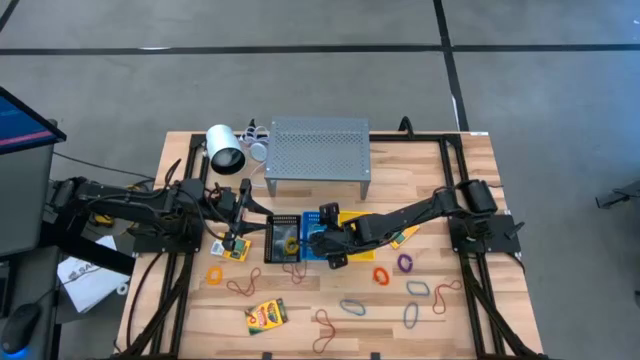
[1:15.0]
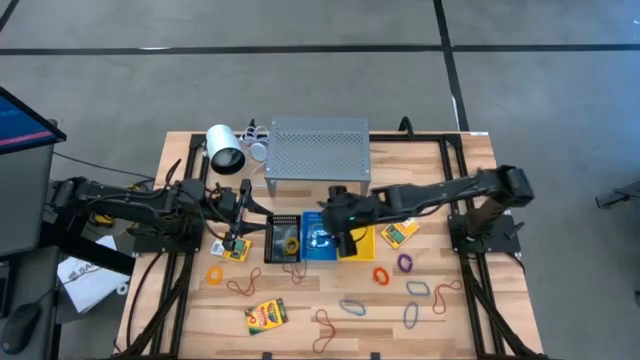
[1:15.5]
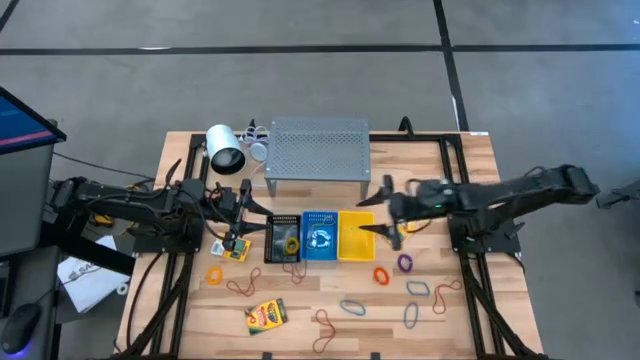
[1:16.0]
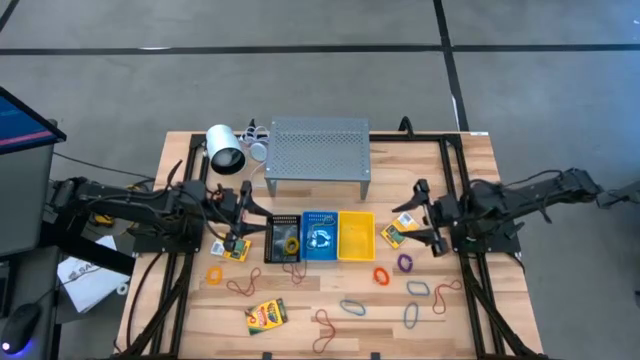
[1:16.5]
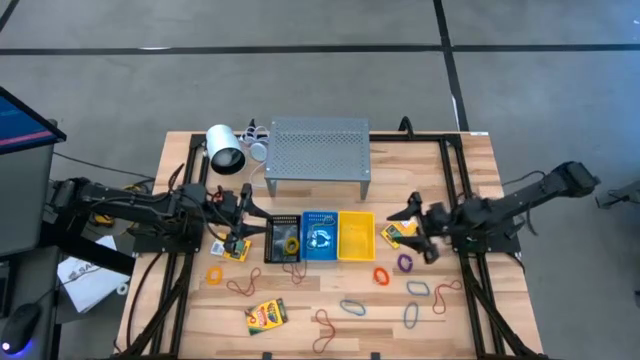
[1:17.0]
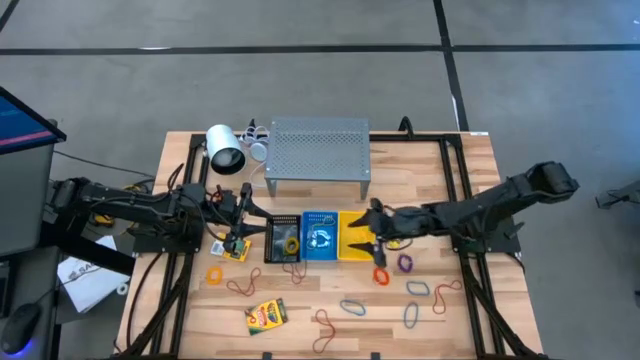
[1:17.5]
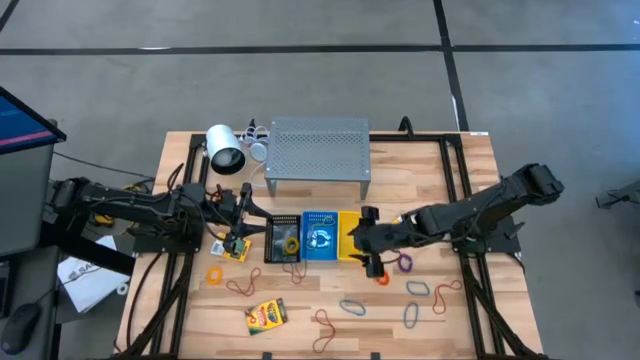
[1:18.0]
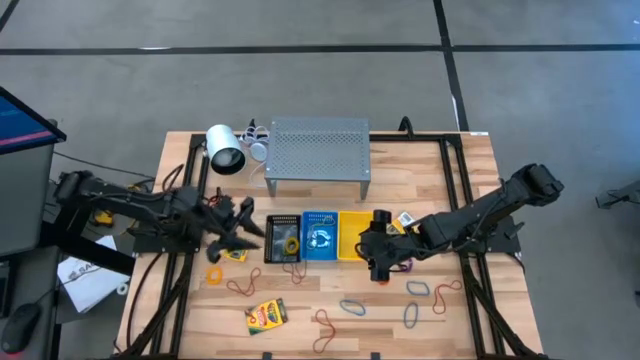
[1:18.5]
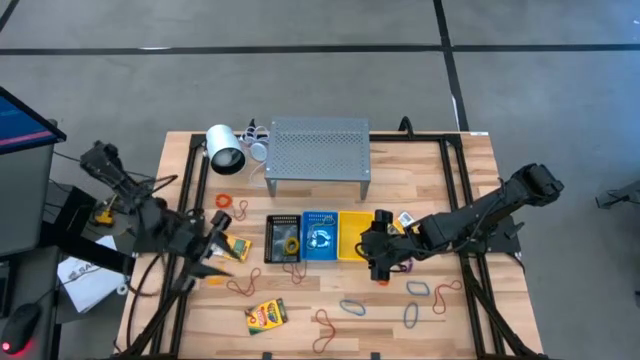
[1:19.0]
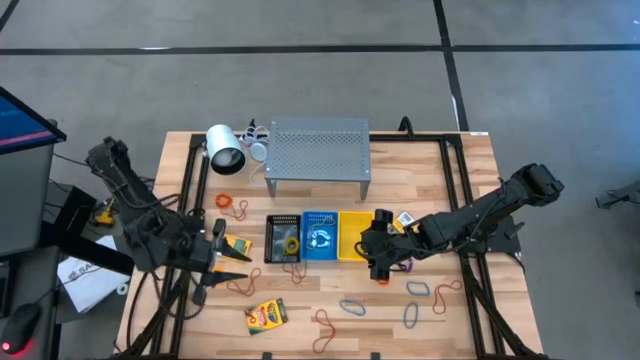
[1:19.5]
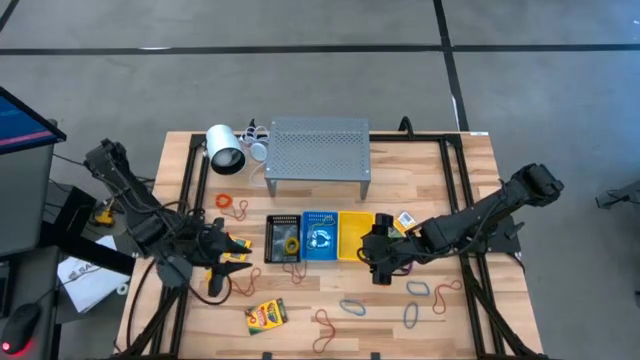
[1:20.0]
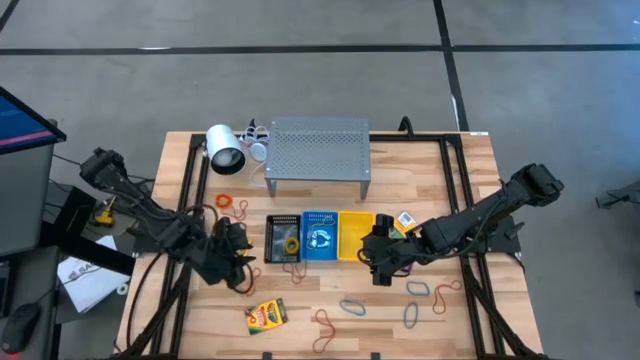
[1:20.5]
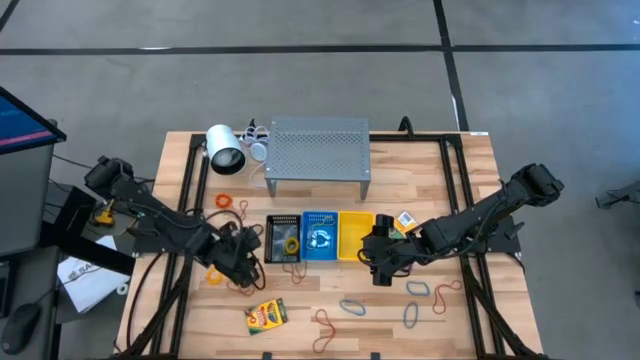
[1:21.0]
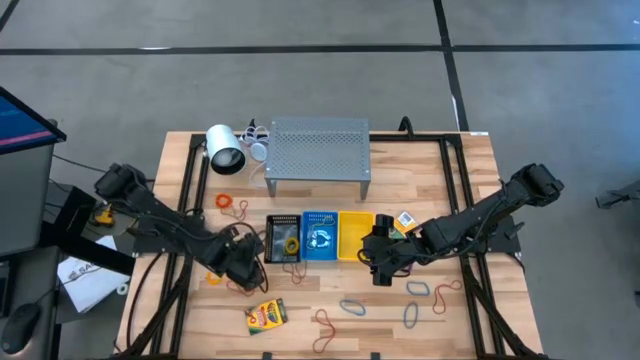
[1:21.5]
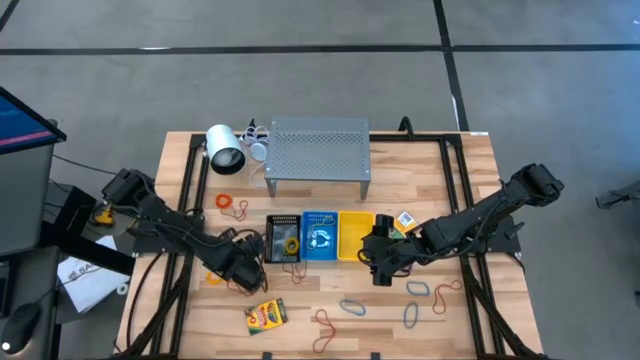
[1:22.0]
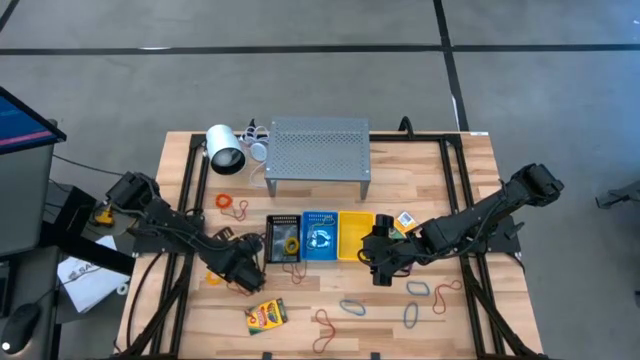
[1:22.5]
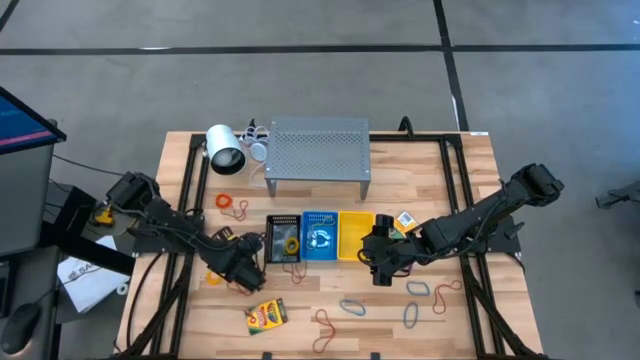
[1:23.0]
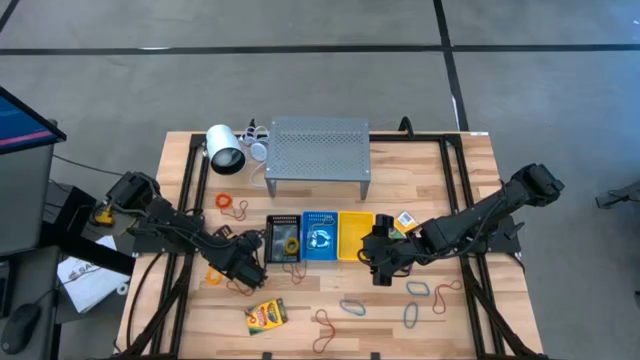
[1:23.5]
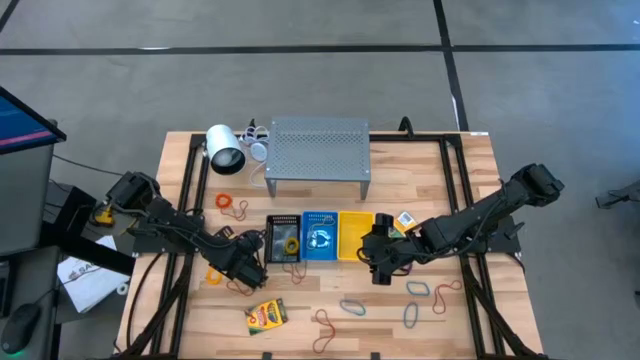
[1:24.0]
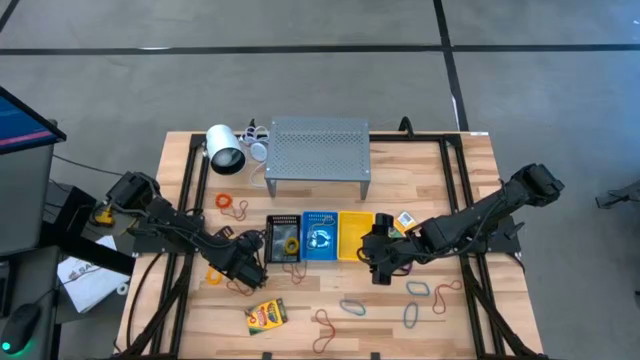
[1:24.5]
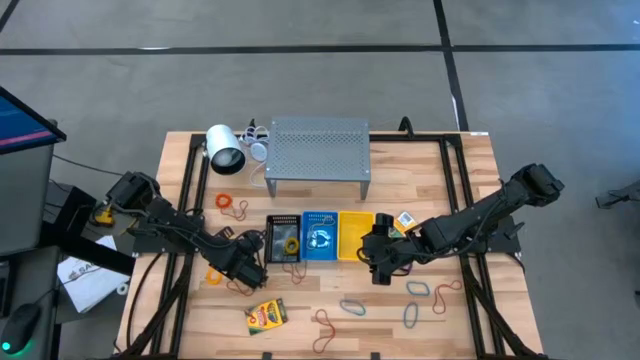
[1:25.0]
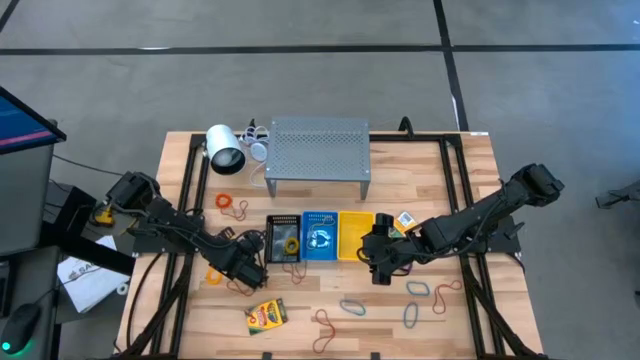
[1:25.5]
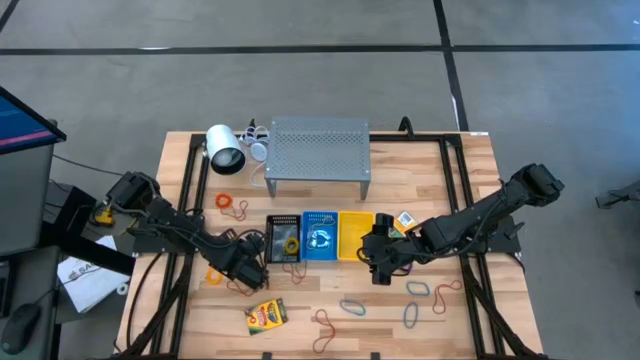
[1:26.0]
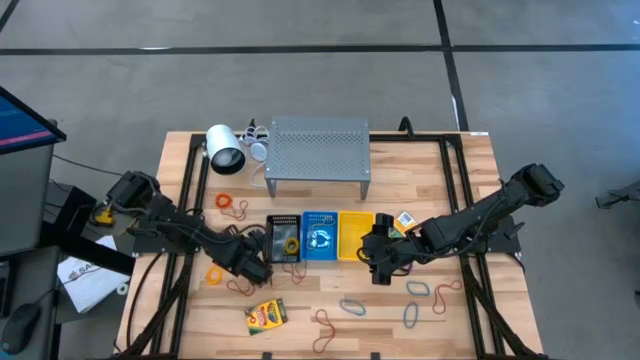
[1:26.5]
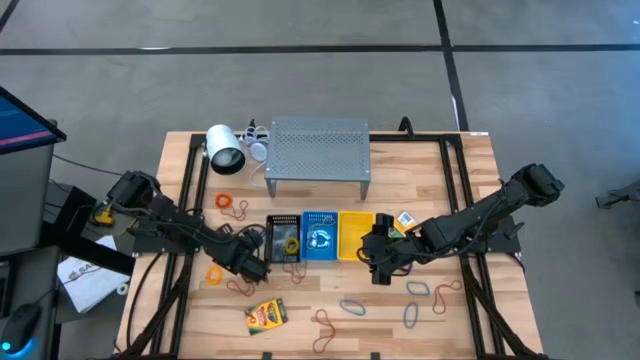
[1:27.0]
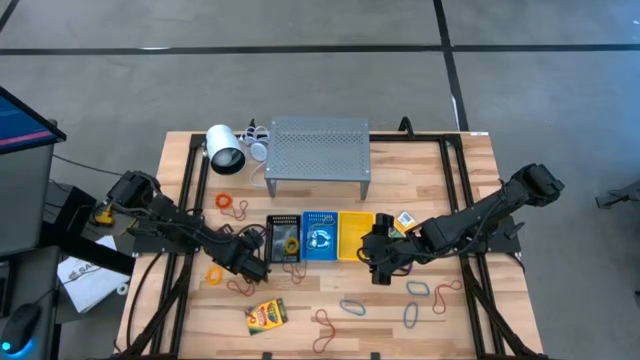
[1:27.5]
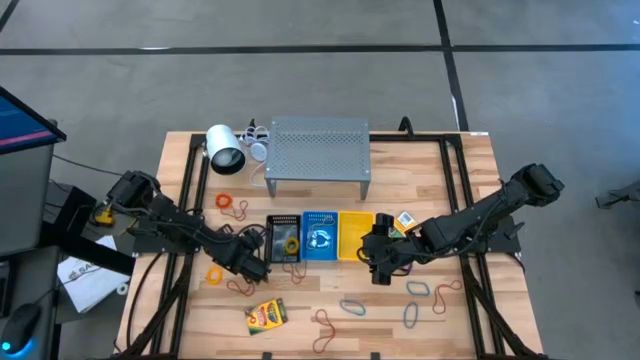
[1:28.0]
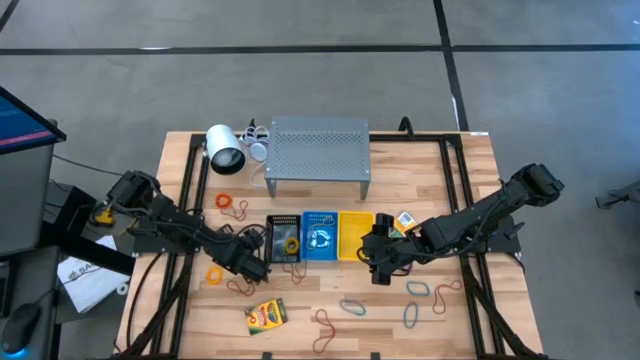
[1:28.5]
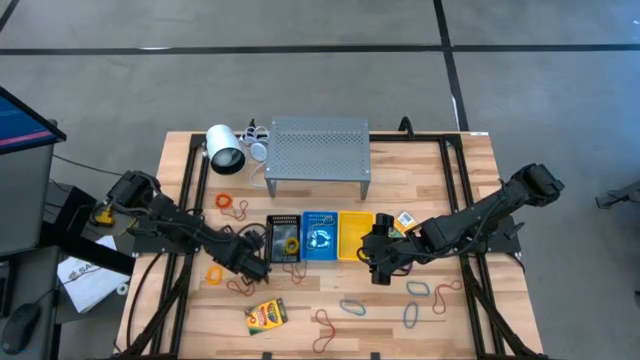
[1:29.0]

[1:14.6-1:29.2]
Task: Pick & Place Office Desk Supplies
Put the yellow crayon box into the yellow basket

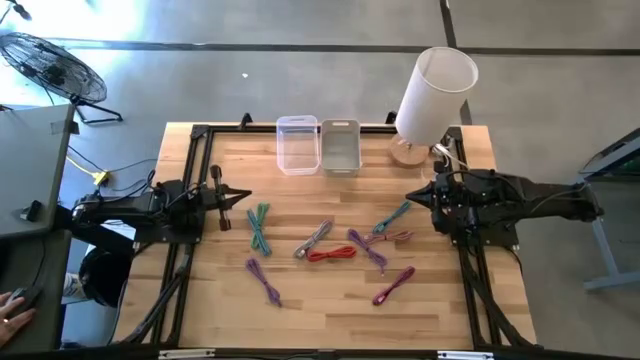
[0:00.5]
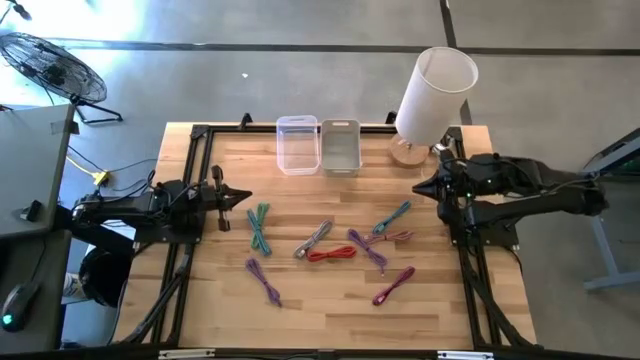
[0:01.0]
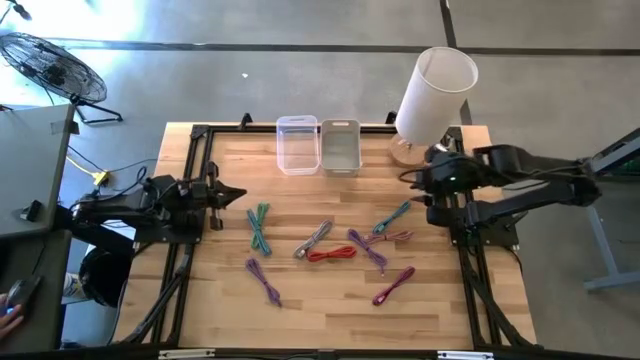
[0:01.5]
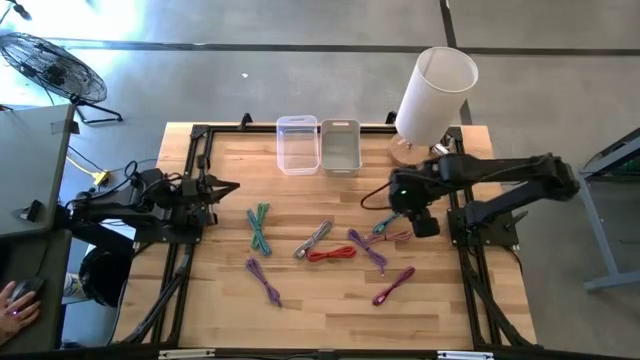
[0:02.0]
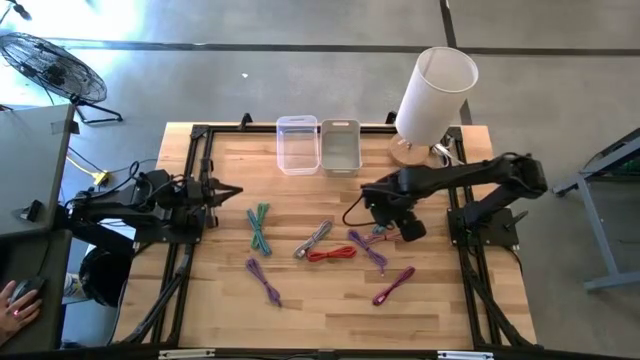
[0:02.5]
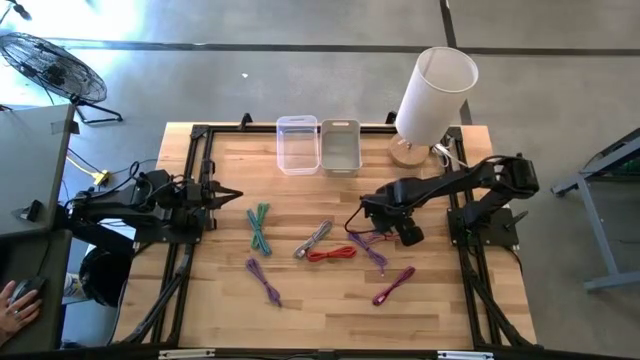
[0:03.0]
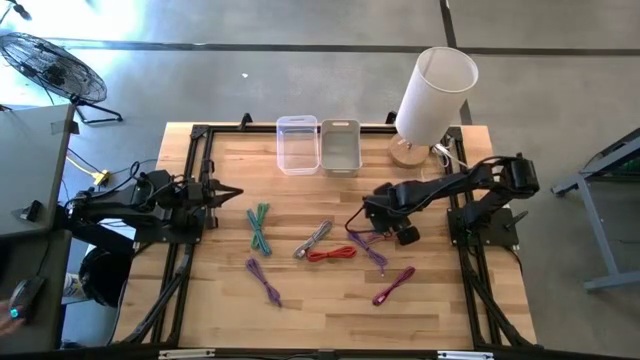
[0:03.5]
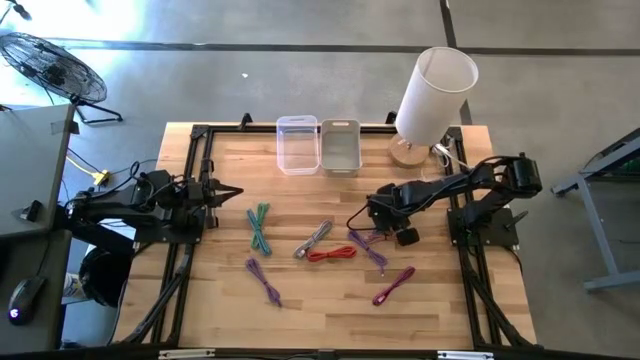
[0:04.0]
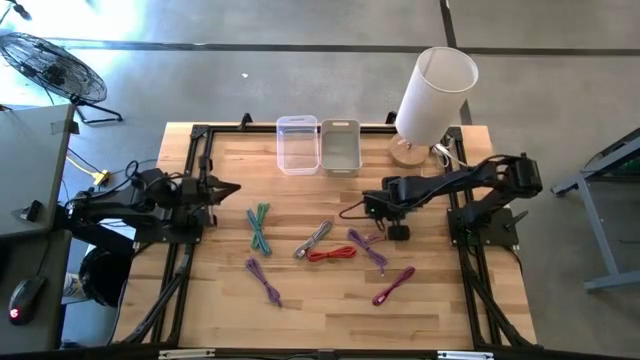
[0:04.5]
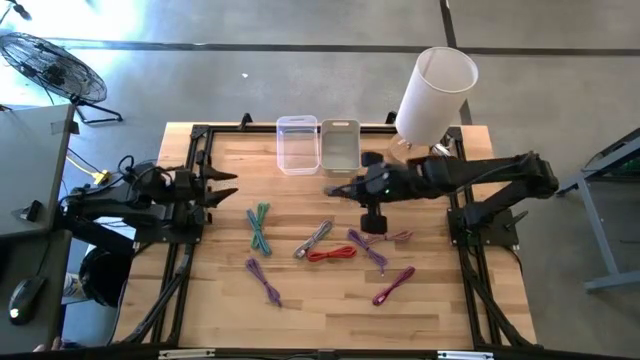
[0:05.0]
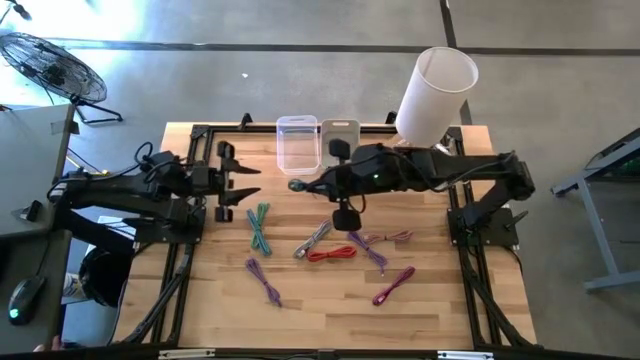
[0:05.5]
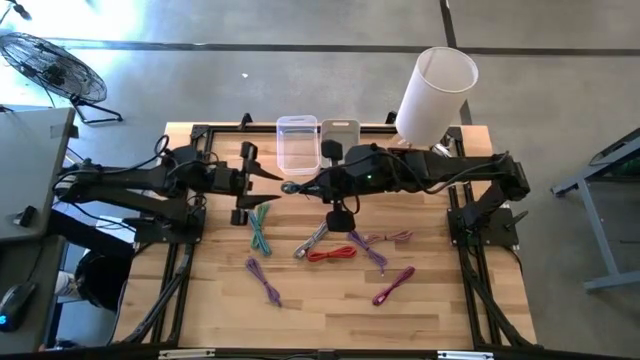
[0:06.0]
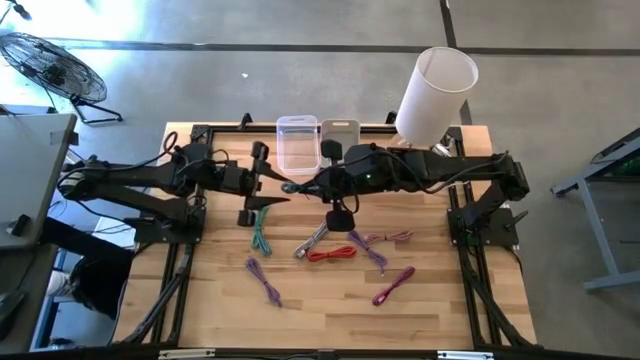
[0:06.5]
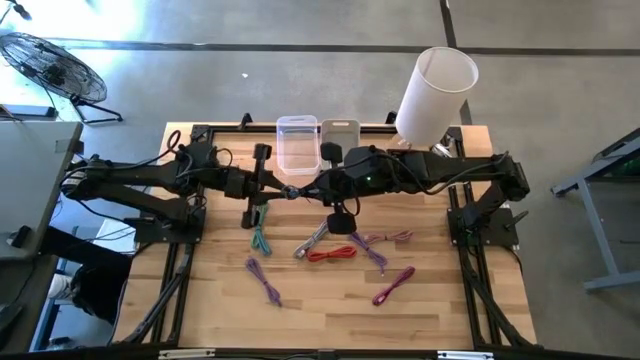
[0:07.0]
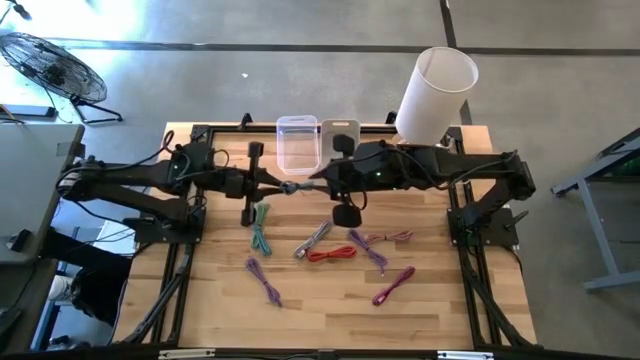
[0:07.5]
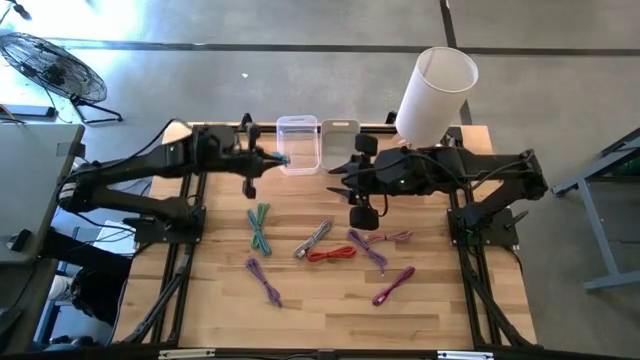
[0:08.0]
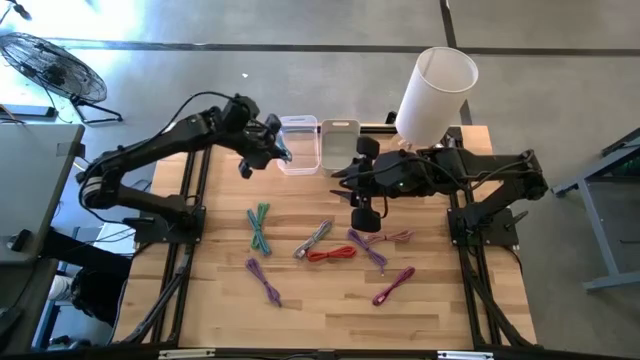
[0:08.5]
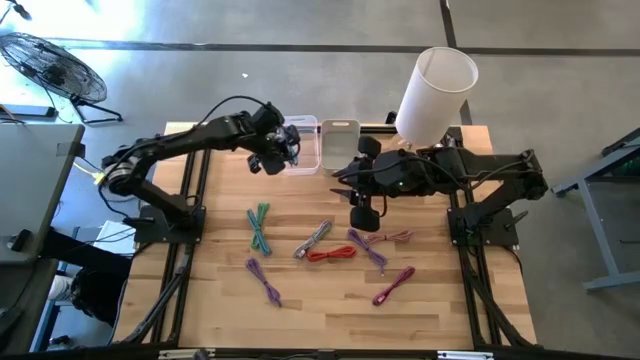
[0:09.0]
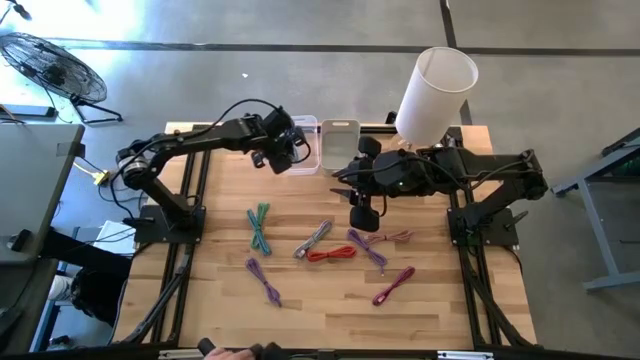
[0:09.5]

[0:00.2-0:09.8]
Task: Pick & Place USB Port
Put the blue patterned charger cable into the transparent bin
